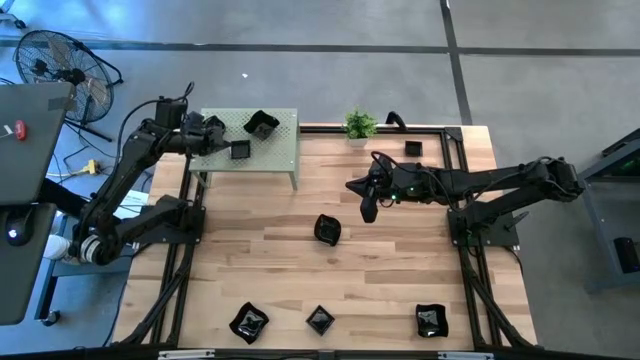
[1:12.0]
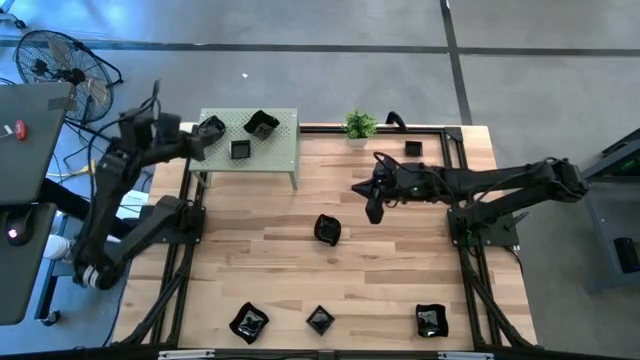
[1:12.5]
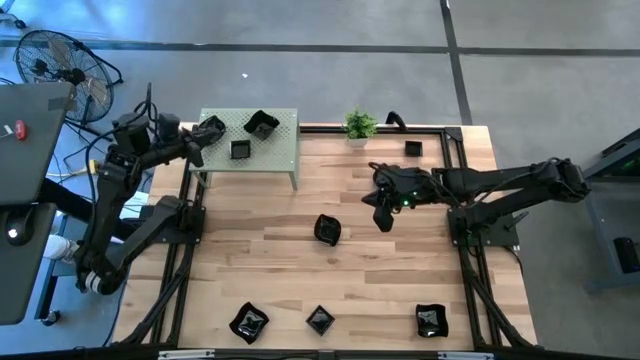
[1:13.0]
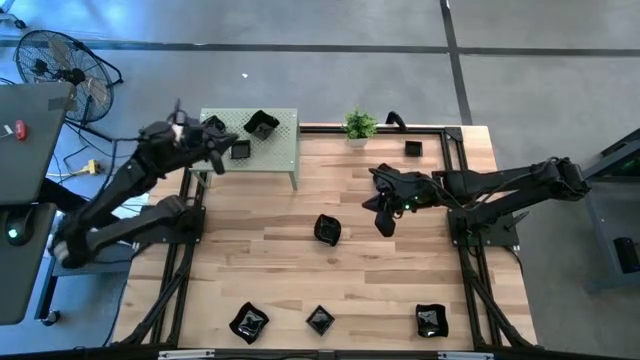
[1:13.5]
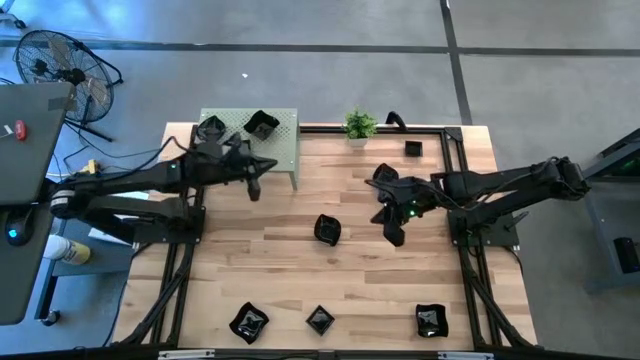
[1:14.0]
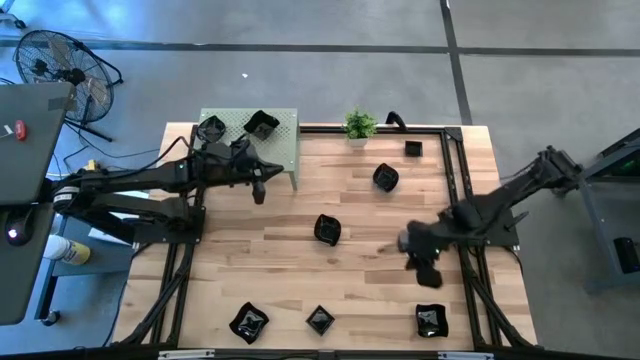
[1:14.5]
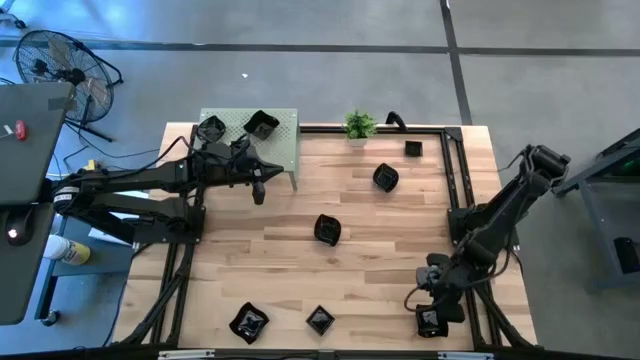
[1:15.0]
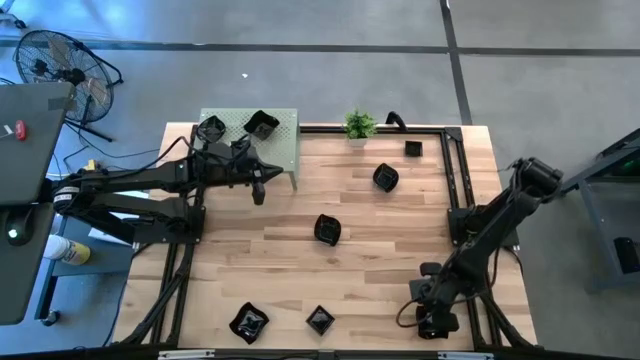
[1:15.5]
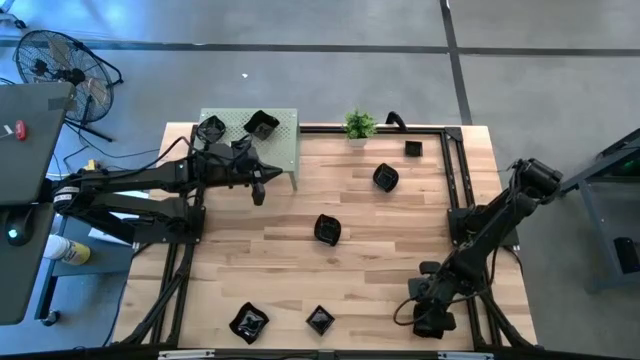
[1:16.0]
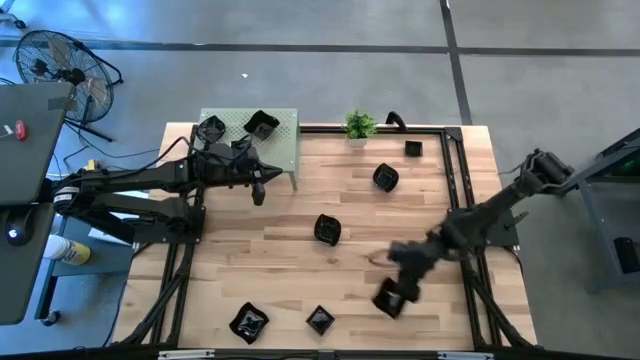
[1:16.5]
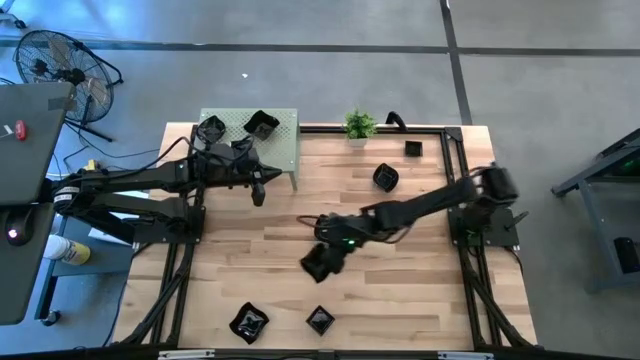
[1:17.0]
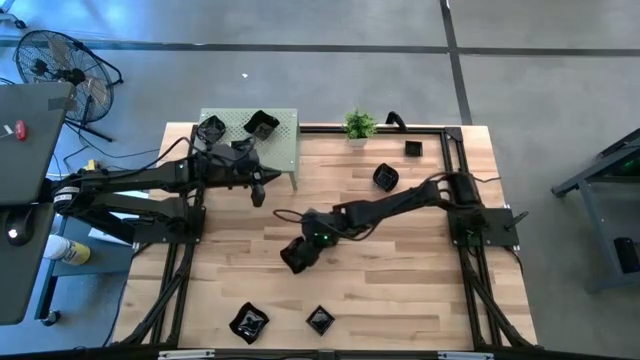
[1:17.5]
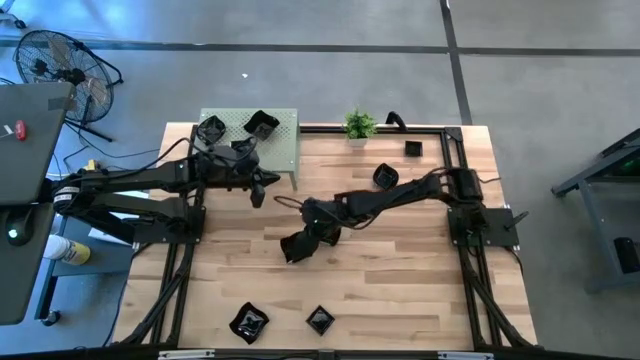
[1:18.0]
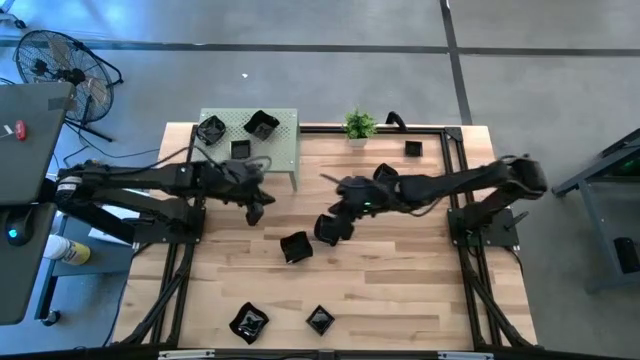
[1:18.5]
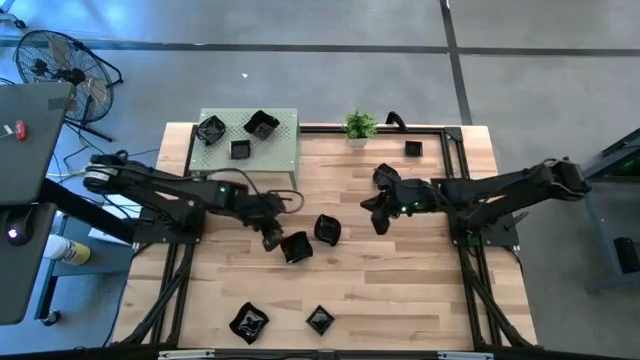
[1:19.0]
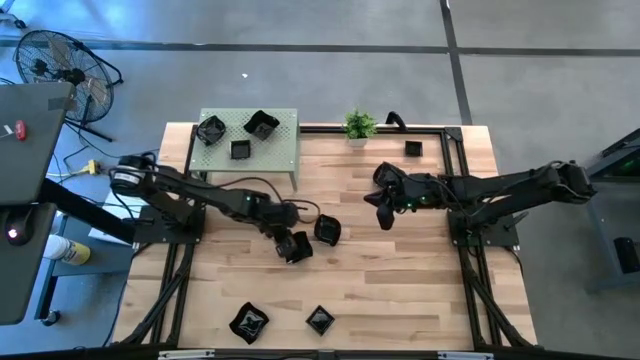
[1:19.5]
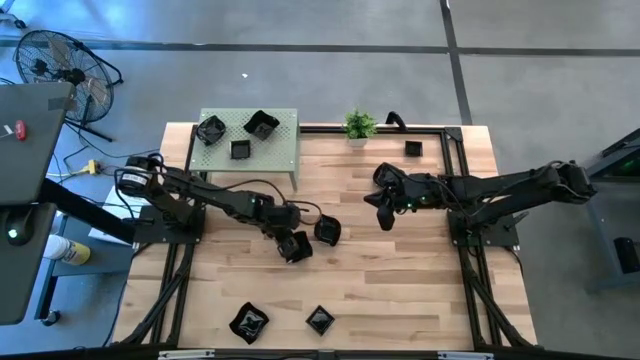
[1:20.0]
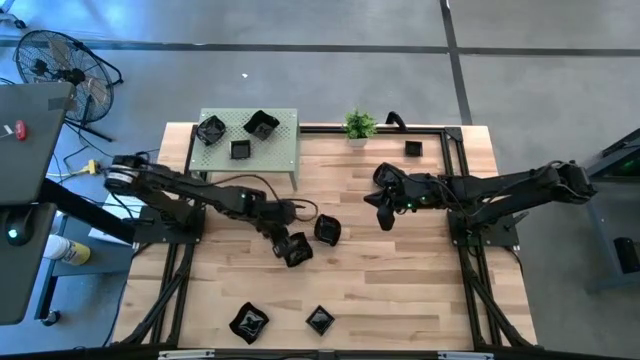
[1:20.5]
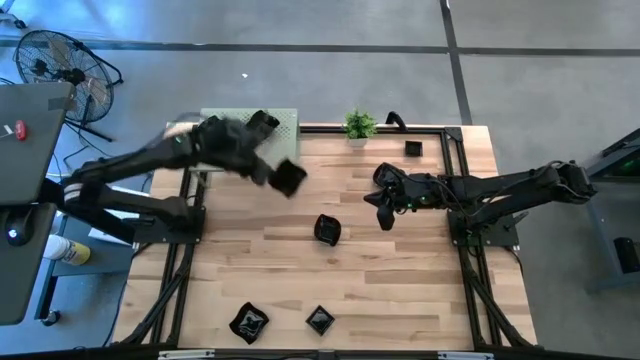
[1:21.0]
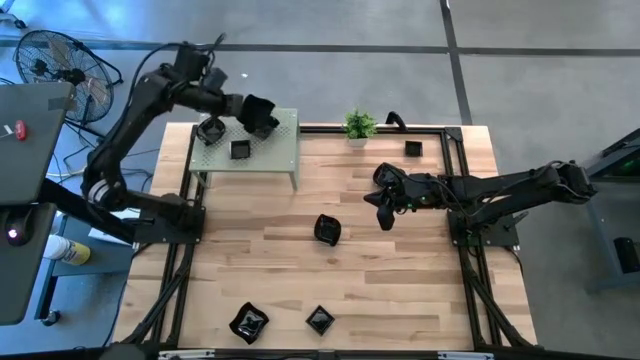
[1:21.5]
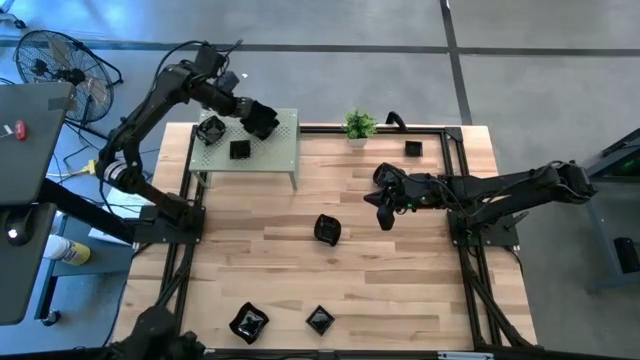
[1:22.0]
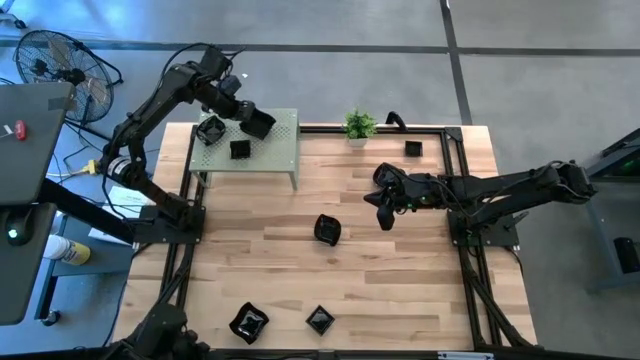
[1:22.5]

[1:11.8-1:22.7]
Task: Pick & Place Mini shaped plates
Stack the black distorted square plate on top of the stacked black distorted square plate on the shelf

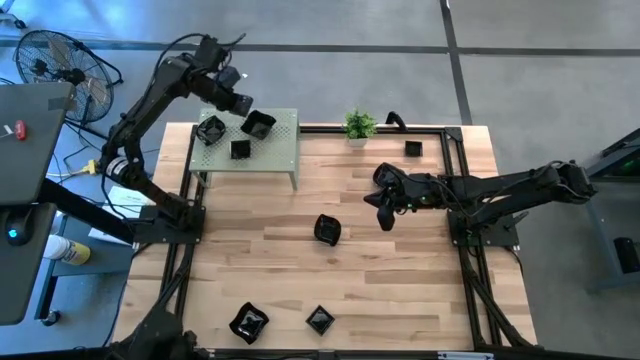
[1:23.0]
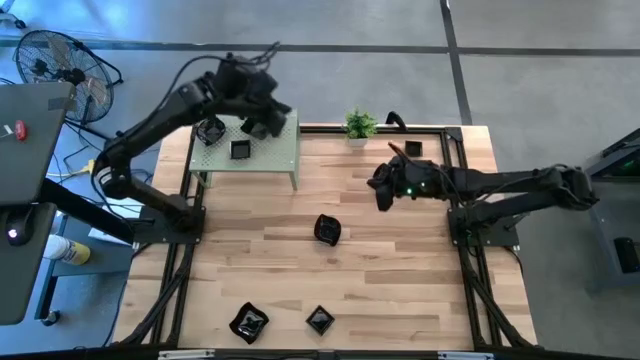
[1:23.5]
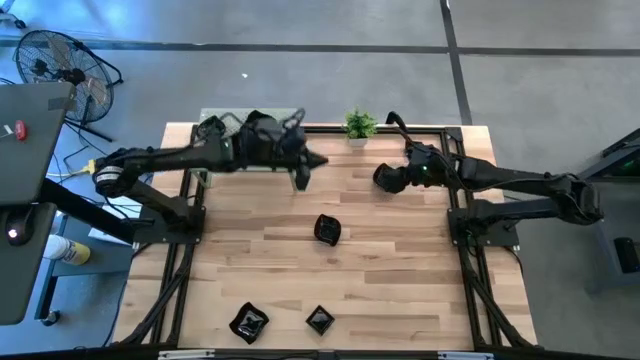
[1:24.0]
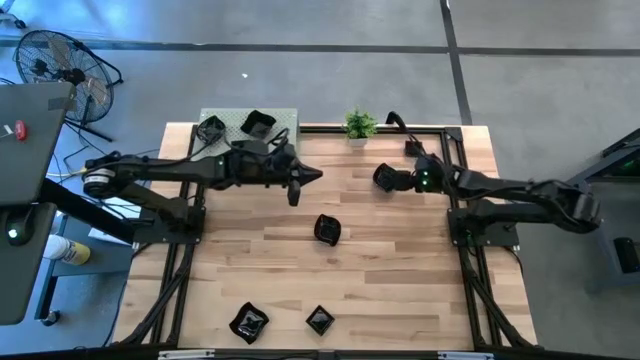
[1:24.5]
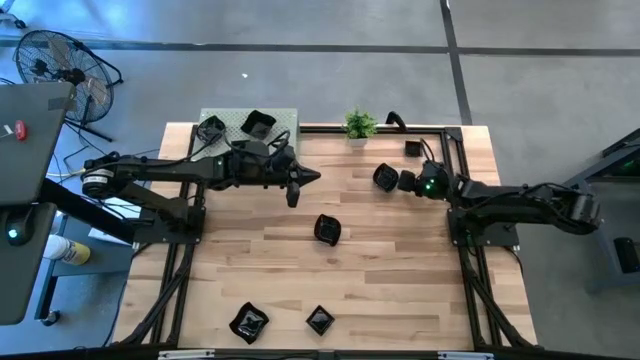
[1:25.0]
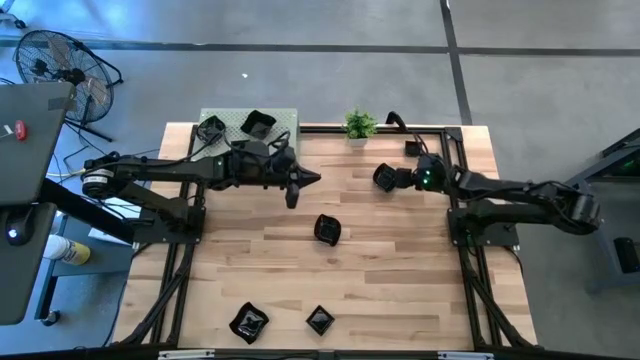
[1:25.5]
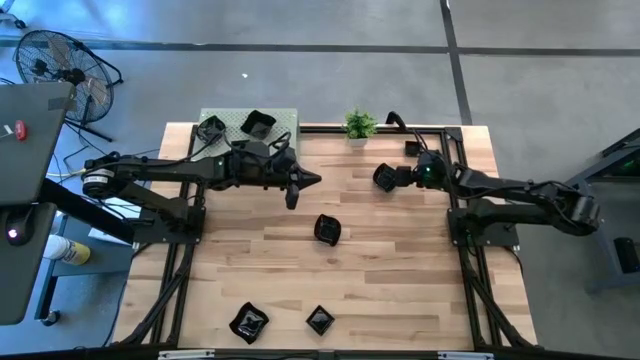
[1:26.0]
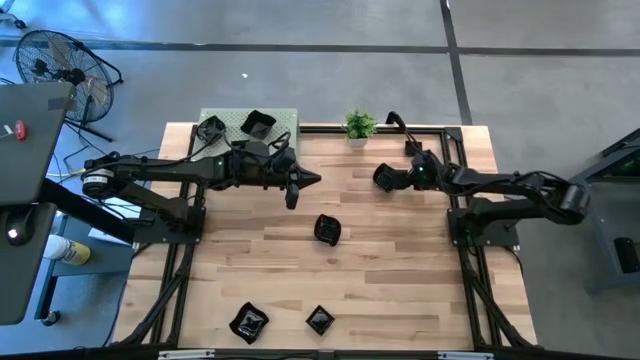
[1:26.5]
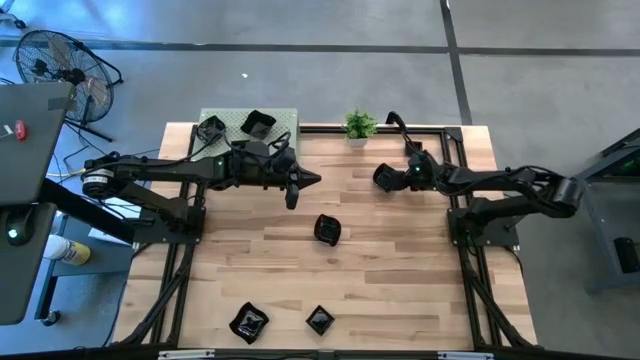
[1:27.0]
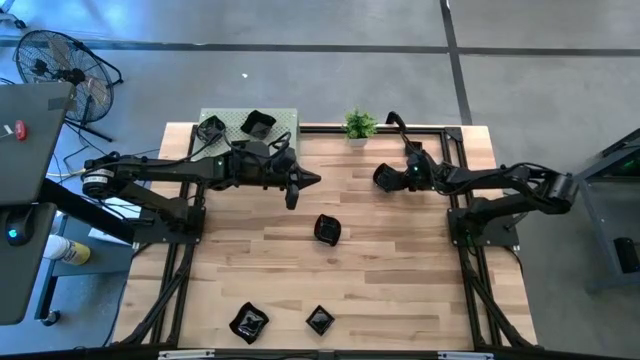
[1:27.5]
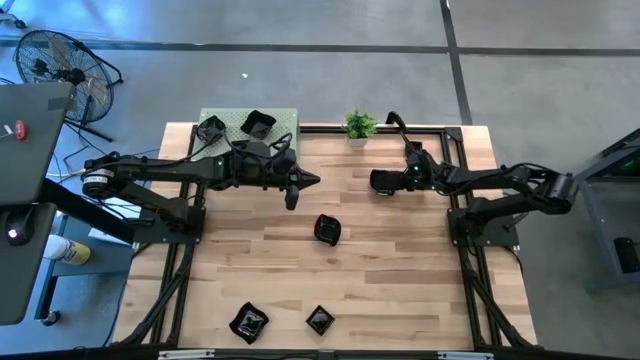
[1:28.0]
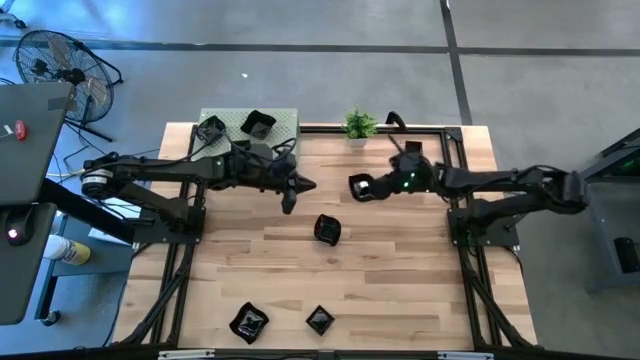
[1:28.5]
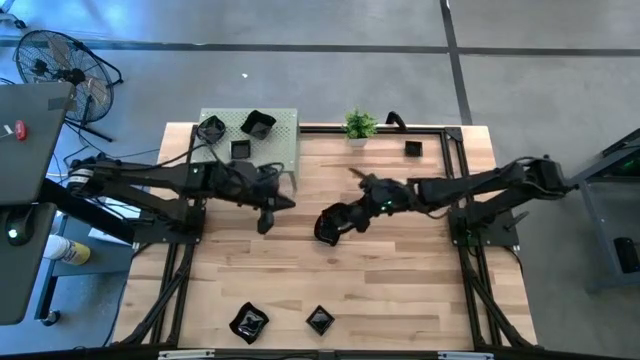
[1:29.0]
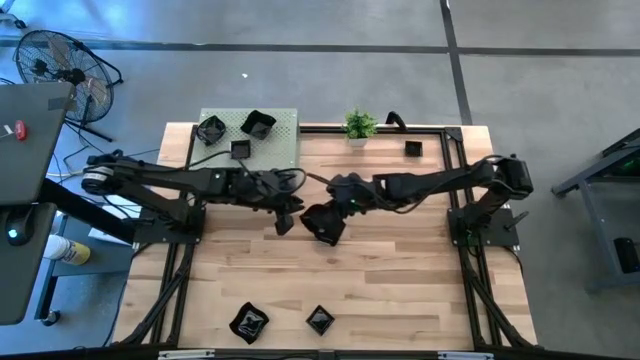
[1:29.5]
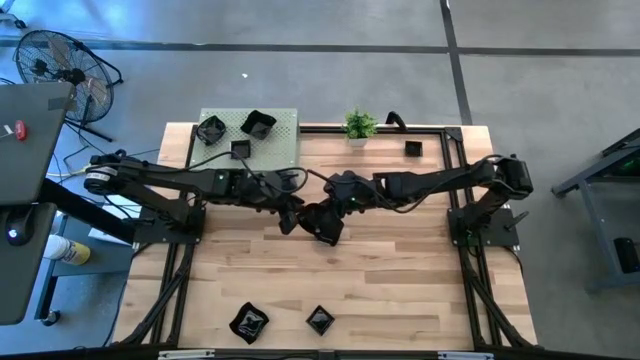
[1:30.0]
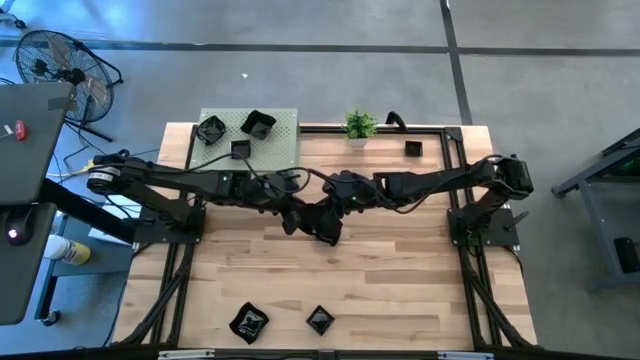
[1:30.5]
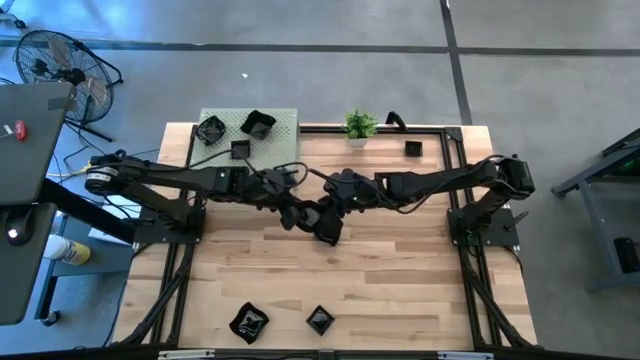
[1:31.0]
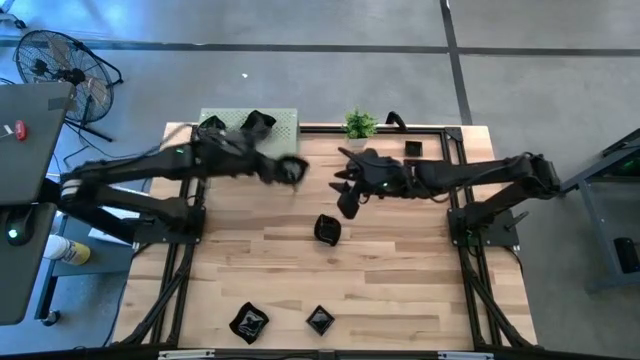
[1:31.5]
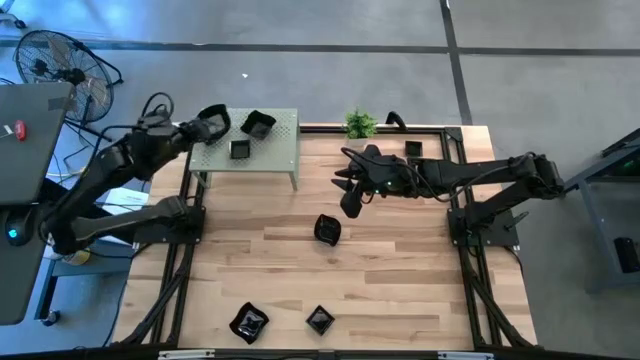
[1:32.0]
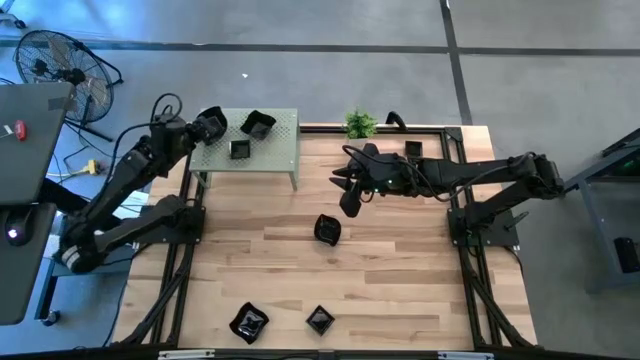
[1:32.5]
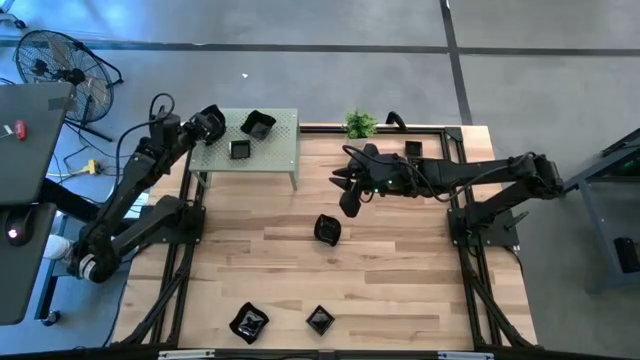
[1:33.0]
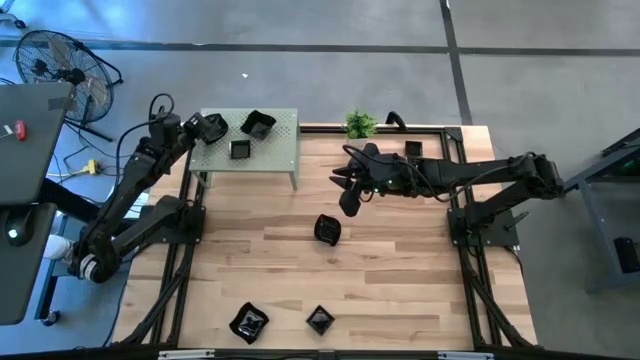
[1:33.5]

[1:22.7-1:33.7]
Stack the black leaf-shaped plate on top of the stacked black leaf-shaped plate on the shelf
